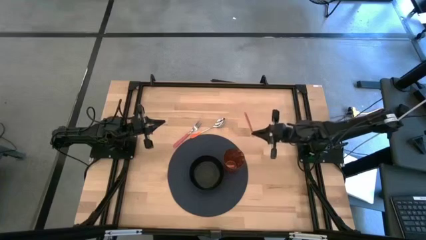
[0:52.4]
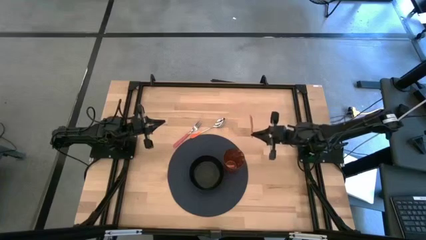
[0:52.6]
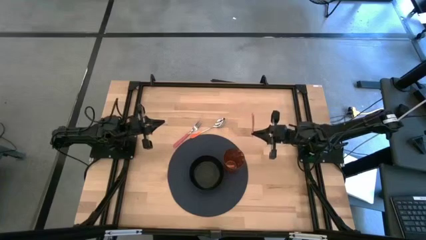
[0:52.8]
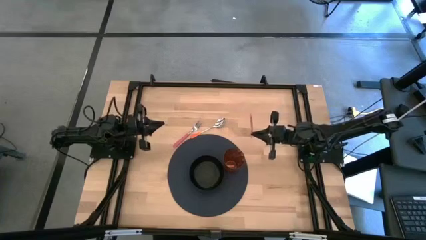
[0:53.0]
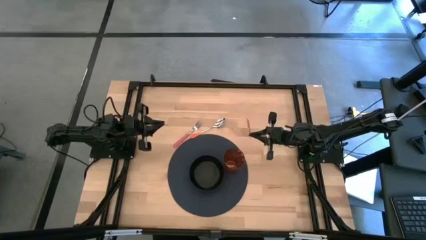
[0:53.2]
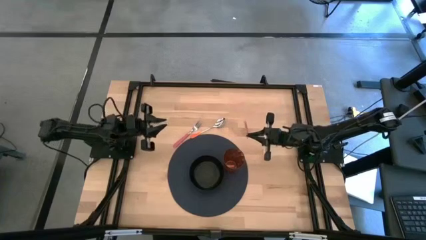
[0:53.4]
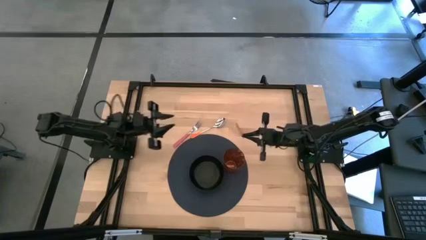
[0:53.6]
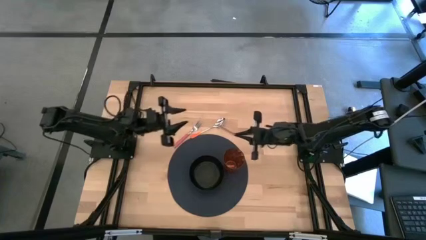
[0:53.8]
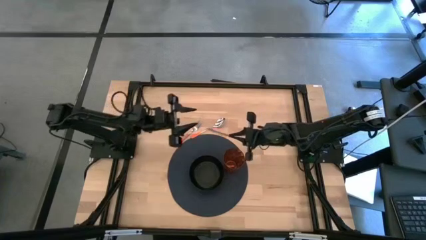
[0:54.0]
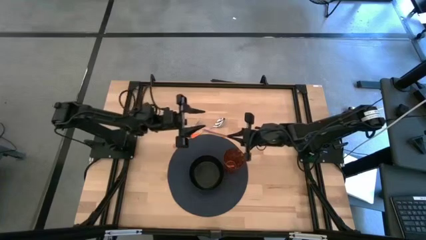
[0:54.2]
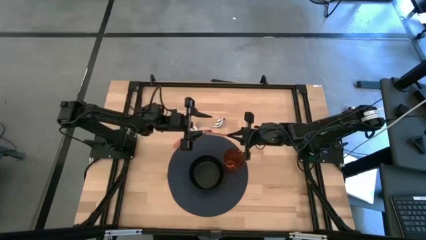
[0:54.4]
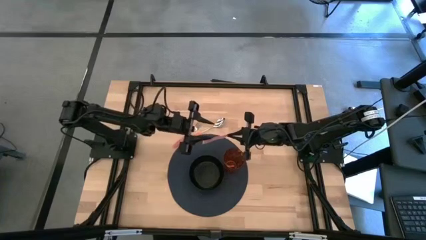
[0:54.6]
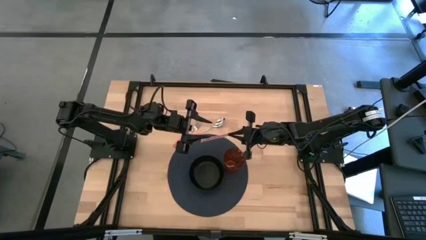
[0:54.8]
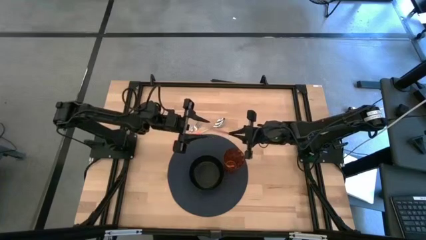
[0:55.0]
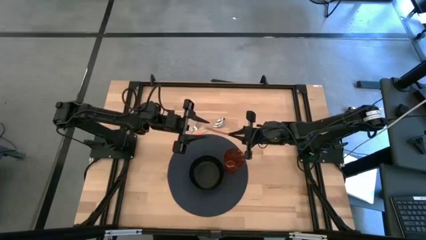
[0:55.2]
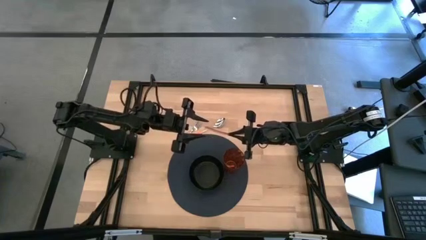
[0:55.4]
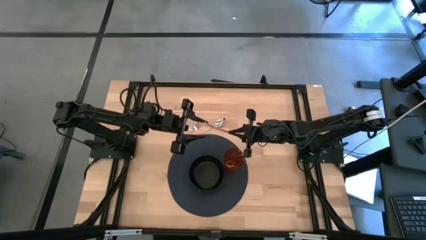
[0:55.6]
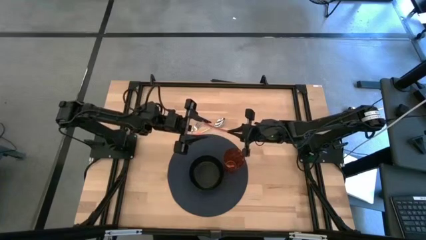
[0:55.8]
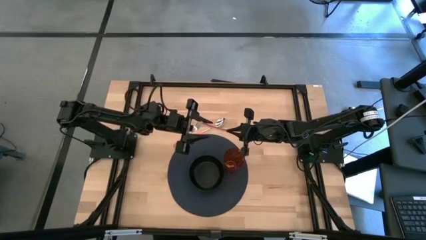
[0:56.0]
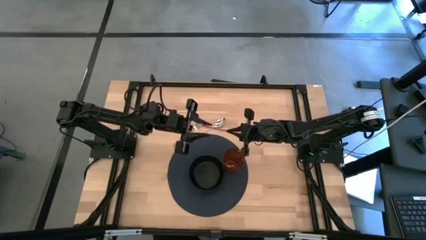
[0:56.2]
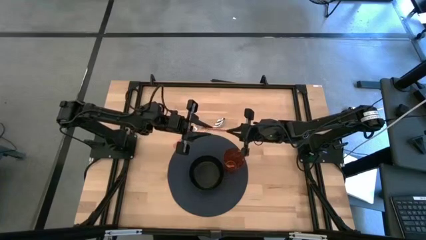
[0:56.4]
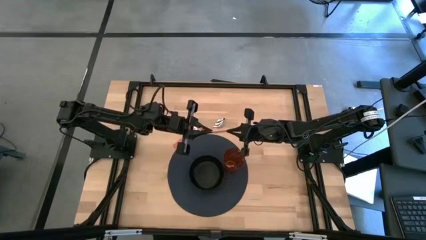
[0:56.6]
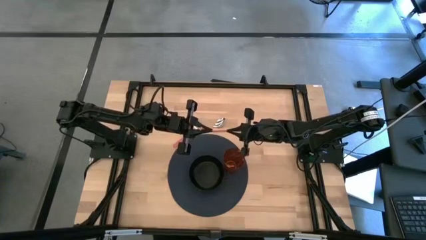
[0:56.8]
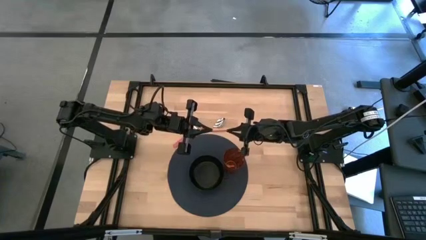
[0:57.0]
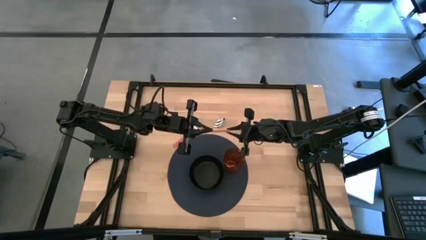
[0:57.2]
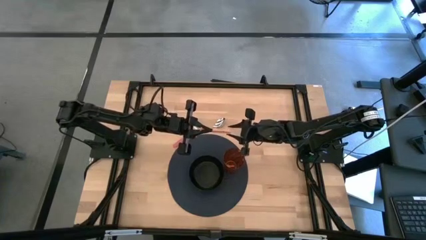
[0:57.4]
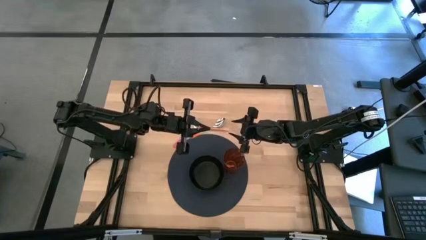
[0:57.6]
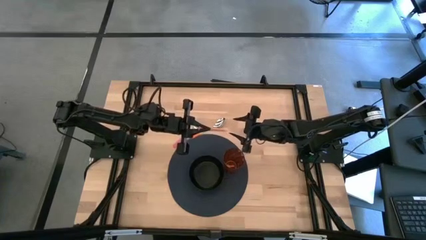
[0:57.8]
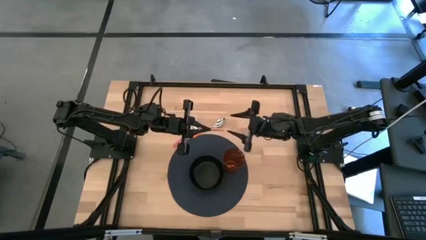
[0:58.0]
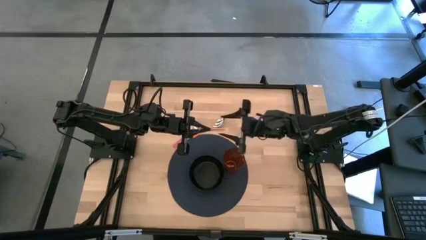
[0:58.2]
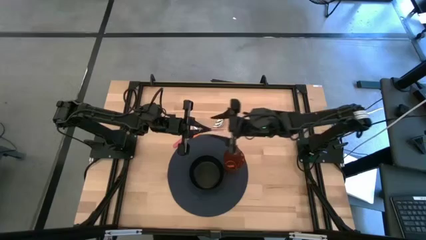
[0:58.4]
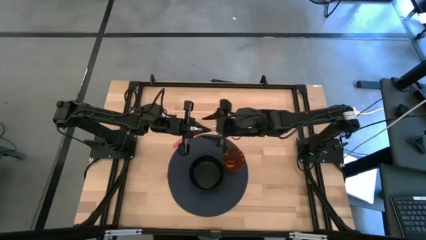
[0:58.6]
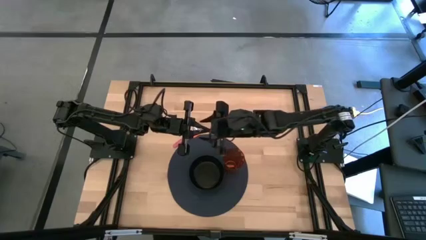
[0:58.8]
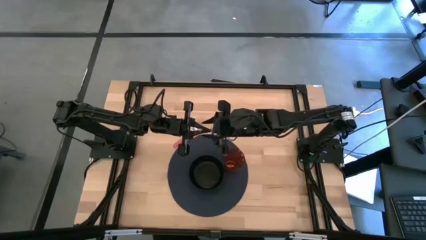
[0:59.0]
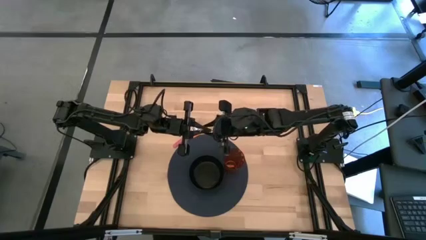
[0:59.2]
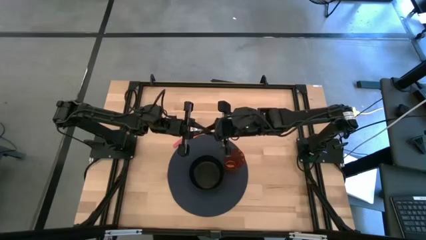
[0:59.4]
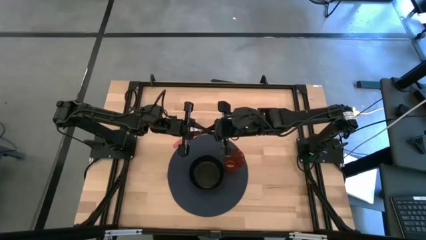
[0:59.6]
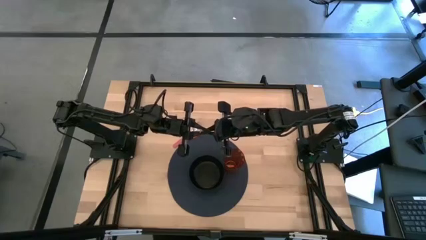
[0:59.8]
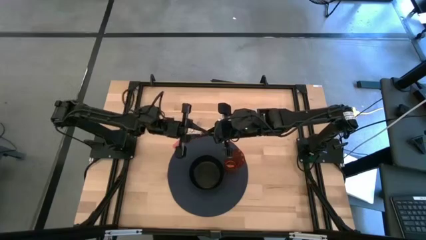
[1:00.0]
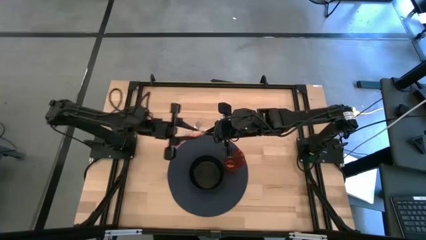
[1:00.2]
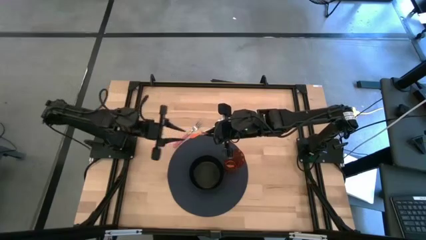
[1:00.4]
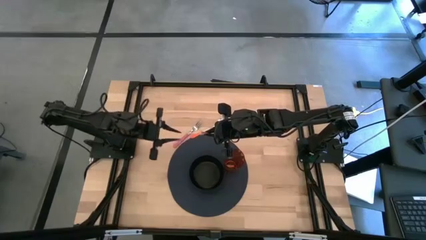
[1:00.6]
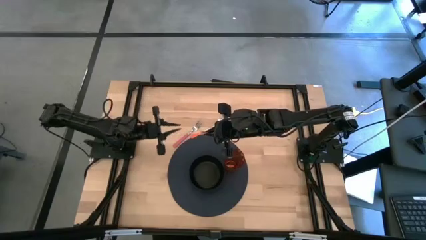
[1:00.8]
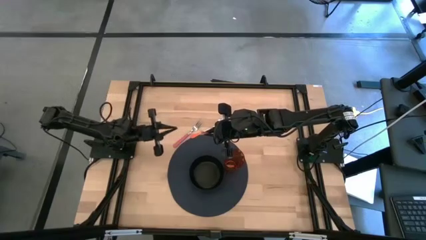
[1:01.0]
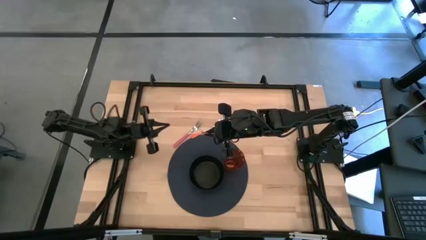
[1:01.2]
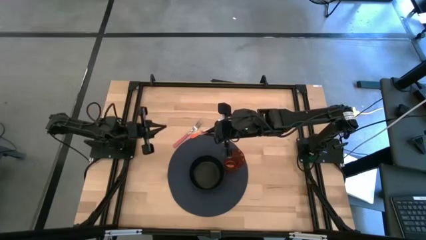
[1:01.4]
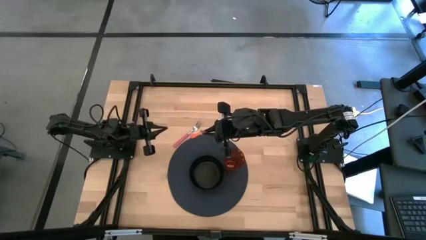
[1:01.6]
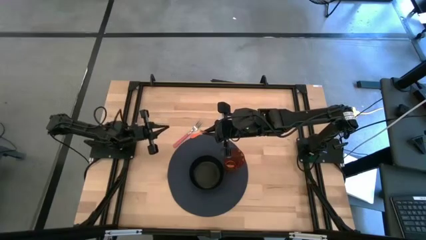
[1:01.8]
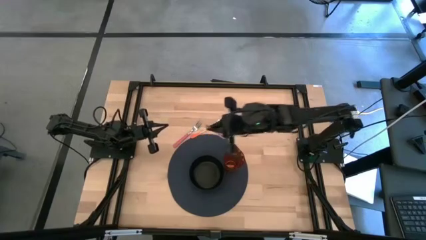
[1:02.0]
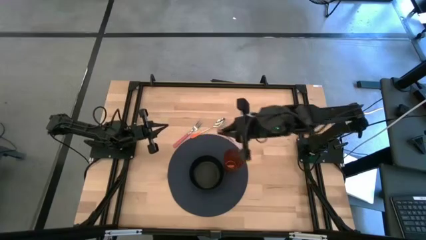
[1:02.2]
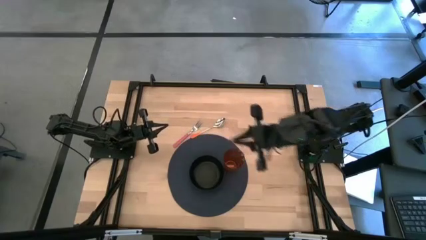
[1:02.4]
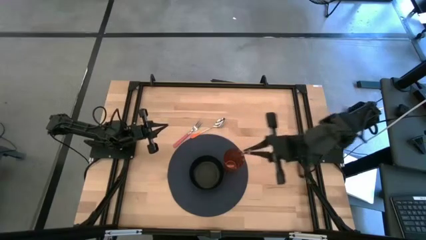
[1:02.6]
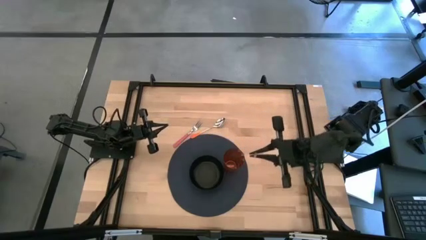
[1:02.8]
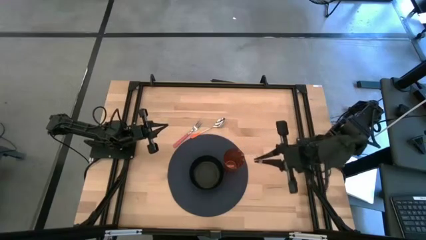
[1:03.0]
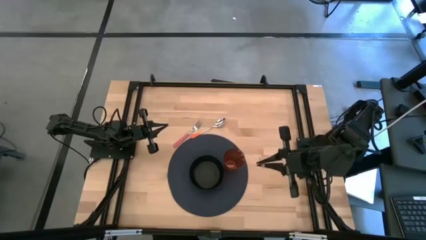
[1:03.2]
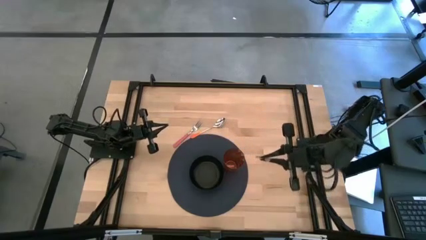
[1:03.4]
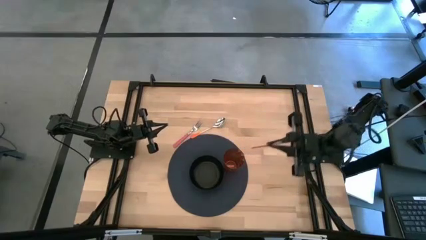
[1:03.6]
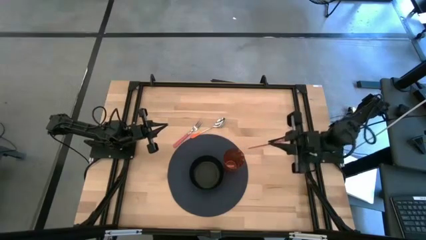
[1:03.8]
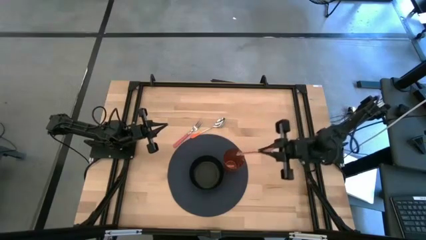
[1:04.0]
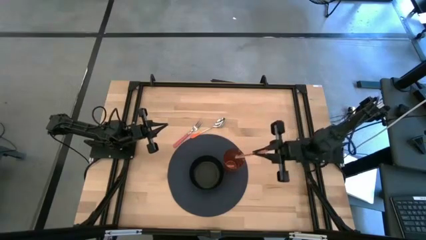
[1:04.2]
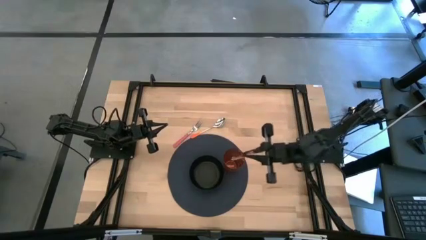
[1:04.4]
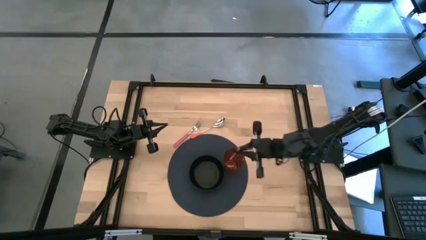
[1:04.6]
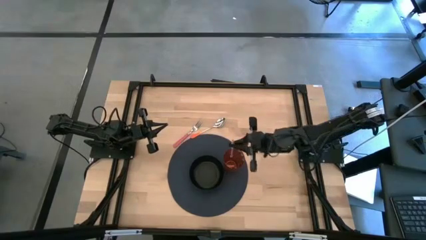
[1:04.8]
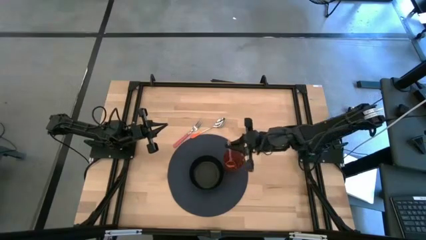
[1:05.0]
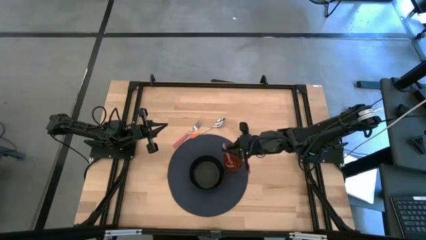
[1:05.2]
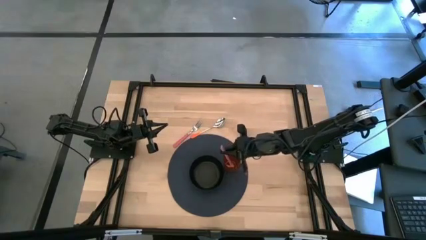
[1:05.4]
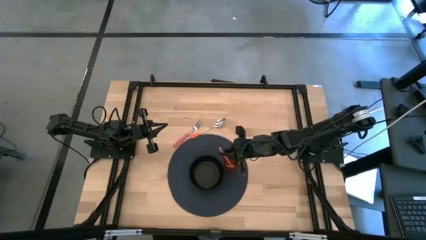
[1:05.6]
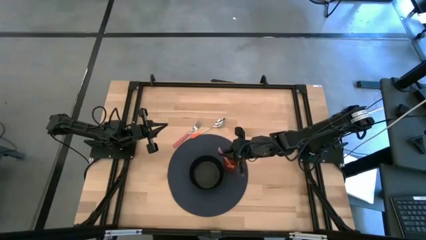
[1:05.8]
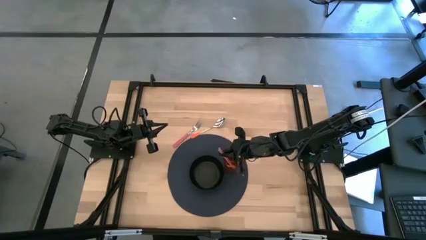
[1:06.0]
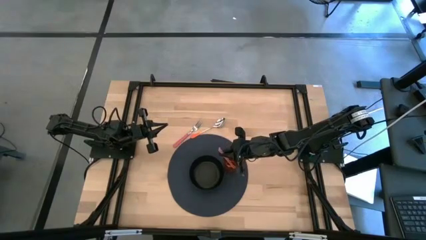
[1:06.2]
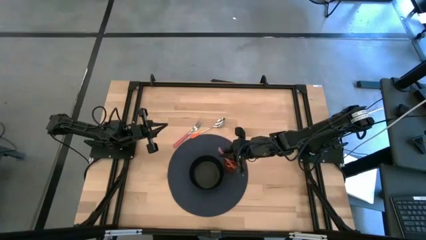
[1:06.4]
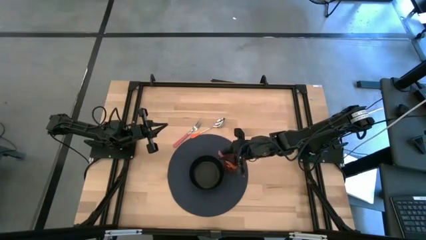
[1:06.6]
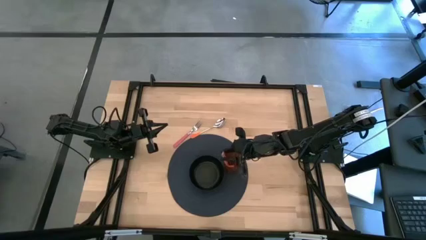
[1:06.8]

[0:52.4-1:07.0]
Task: Pick & Place Utensil
Put the red straw into the orange cup
